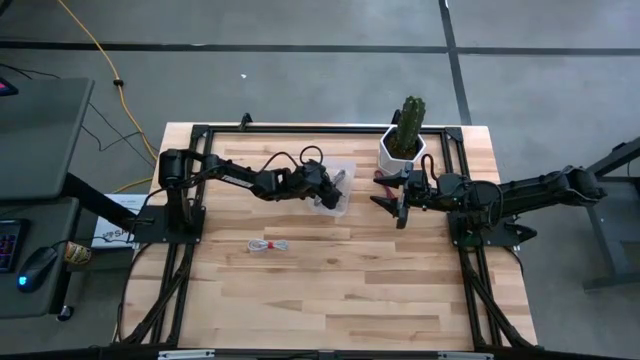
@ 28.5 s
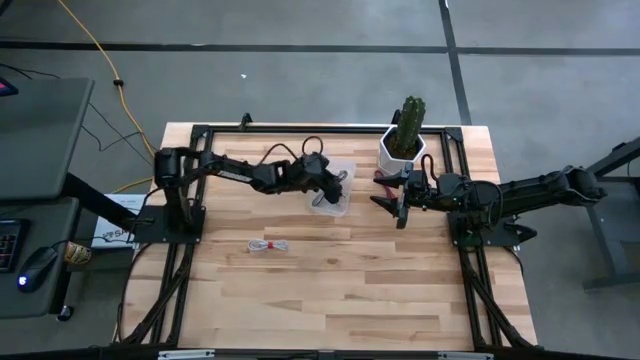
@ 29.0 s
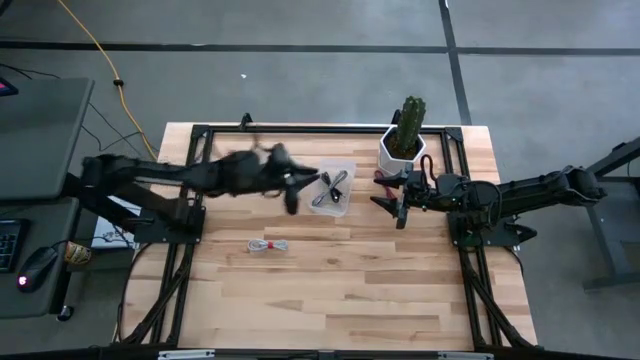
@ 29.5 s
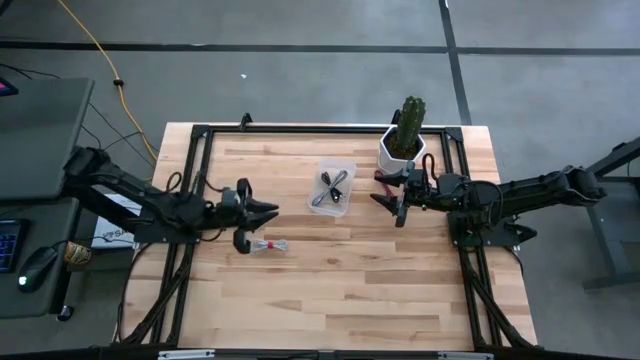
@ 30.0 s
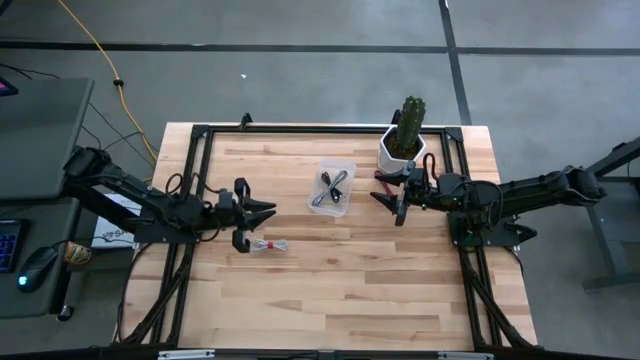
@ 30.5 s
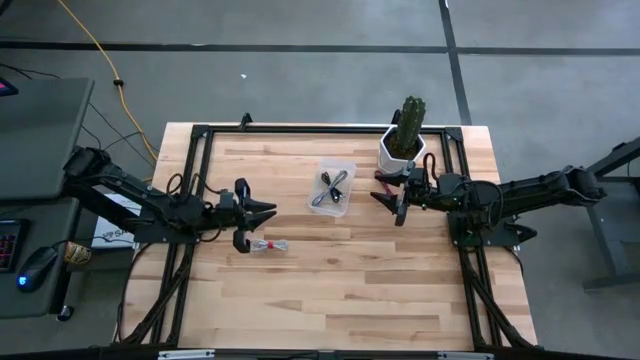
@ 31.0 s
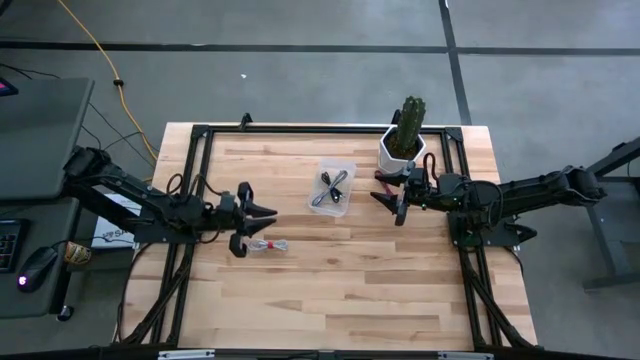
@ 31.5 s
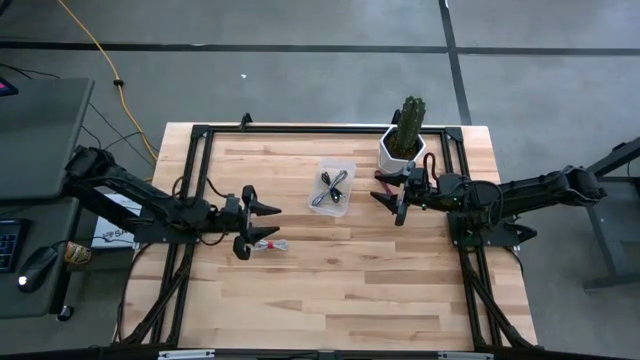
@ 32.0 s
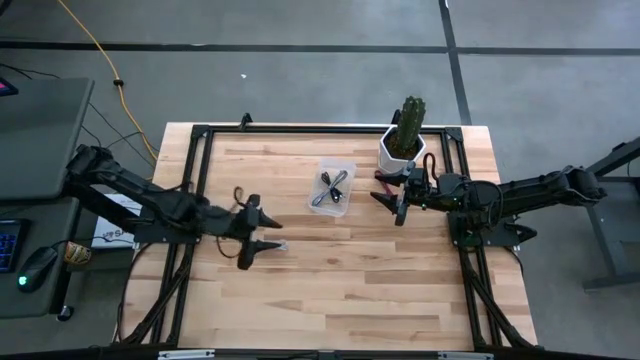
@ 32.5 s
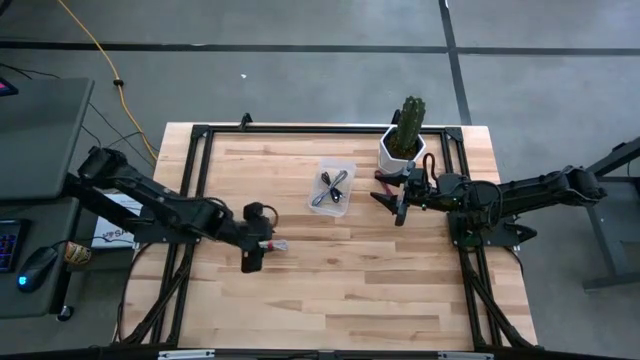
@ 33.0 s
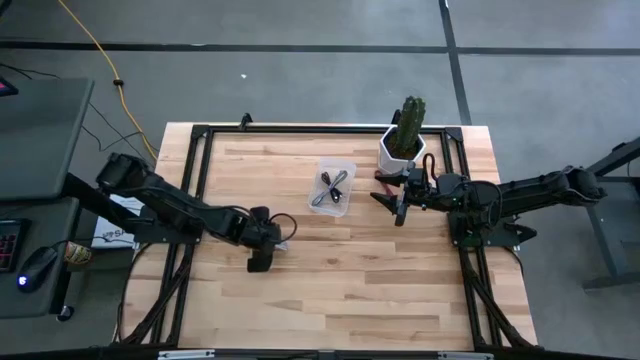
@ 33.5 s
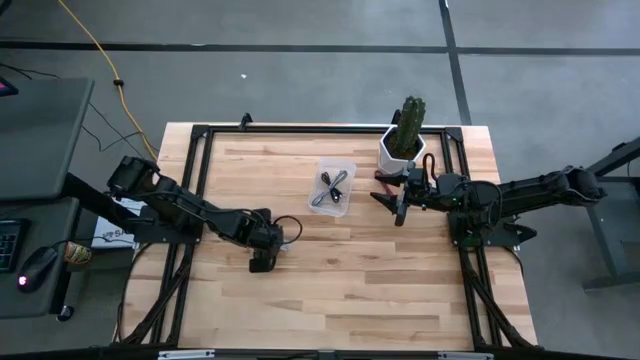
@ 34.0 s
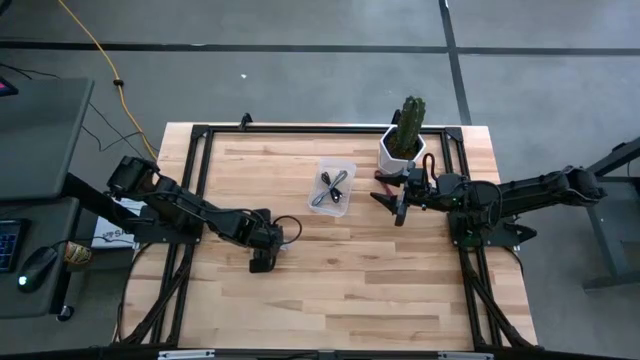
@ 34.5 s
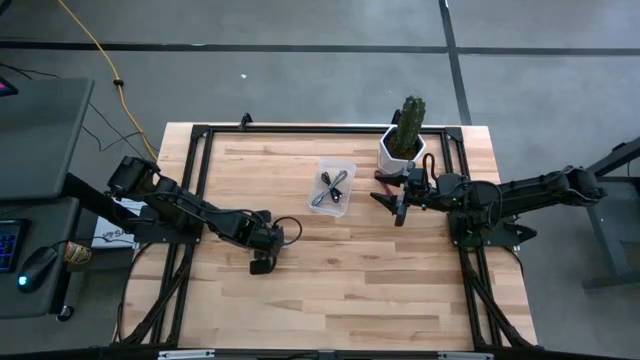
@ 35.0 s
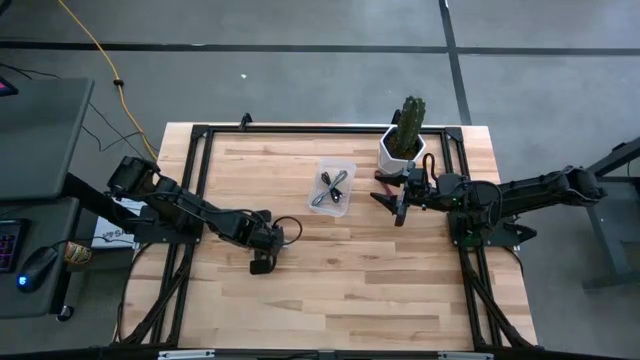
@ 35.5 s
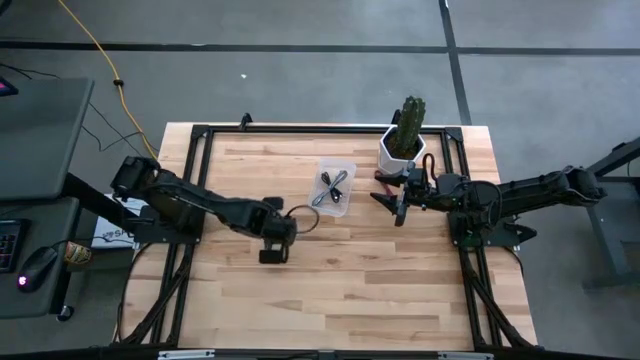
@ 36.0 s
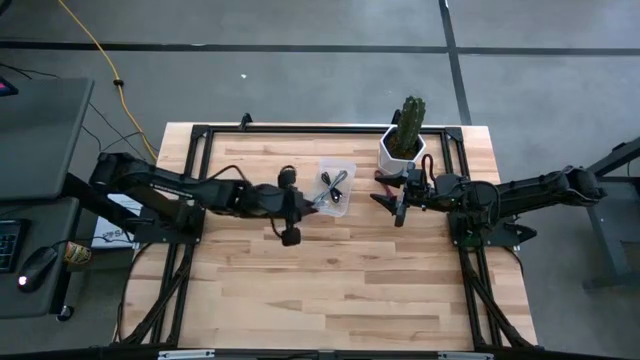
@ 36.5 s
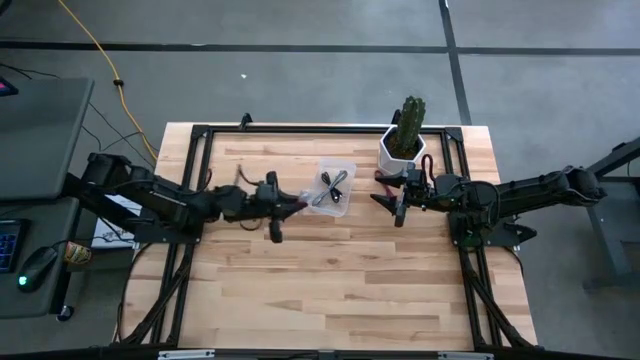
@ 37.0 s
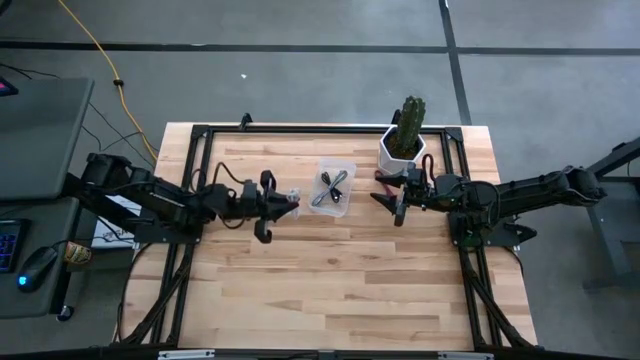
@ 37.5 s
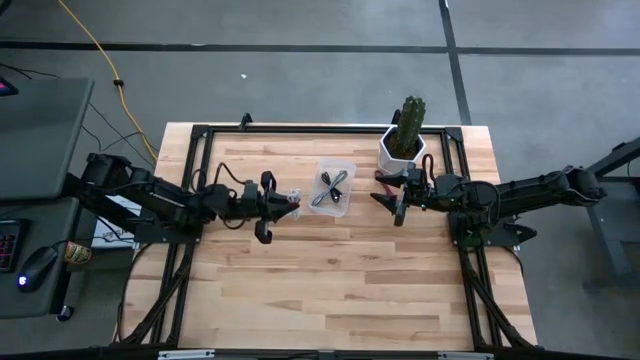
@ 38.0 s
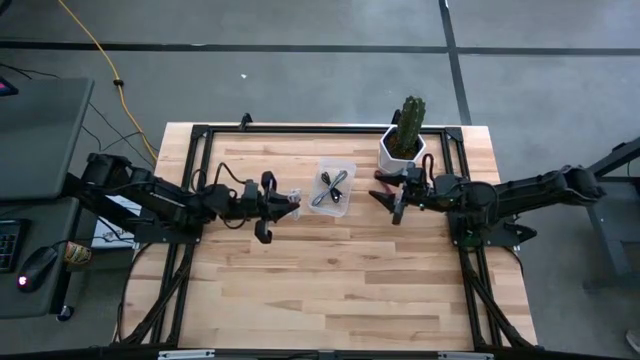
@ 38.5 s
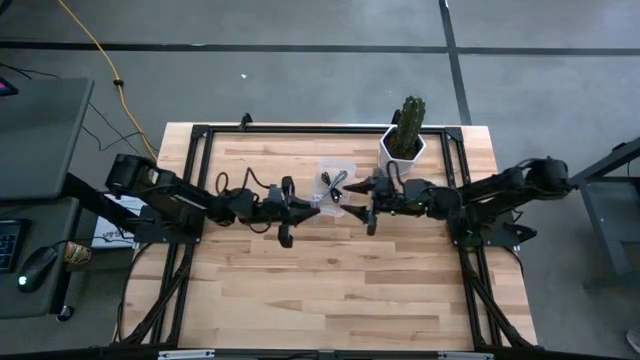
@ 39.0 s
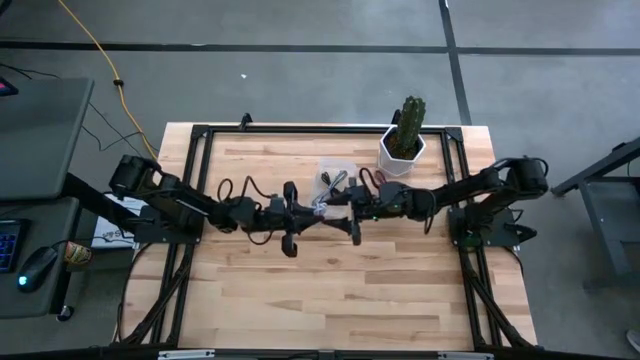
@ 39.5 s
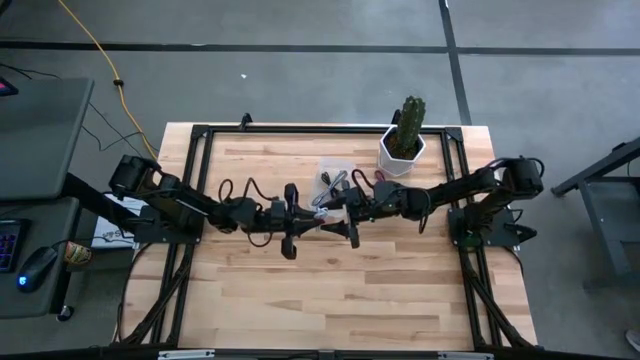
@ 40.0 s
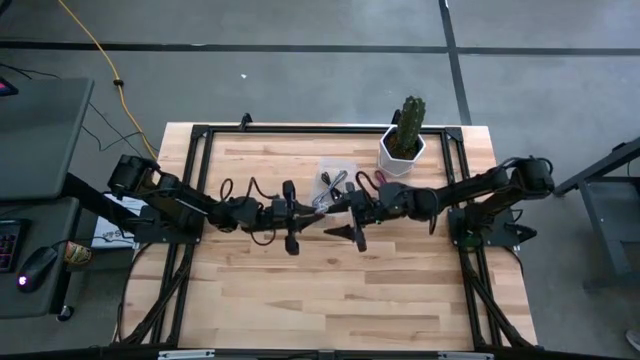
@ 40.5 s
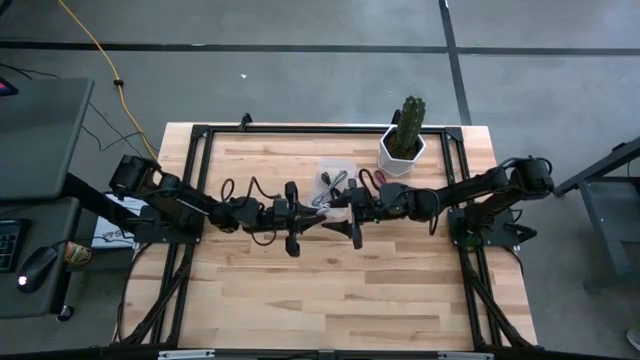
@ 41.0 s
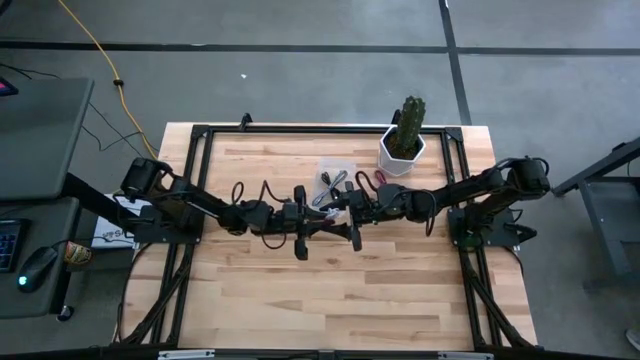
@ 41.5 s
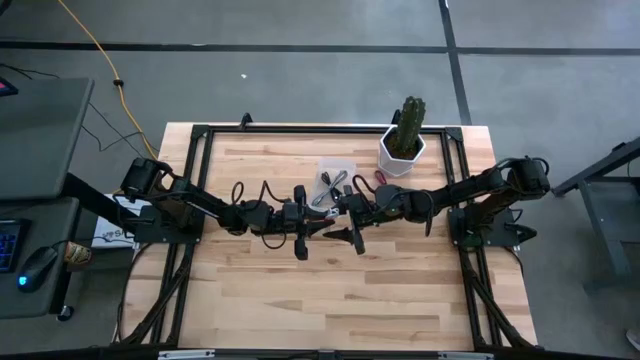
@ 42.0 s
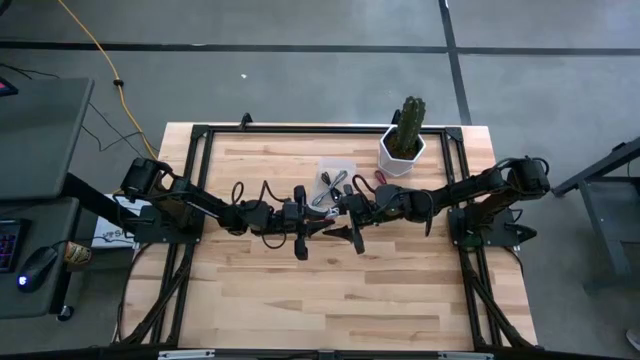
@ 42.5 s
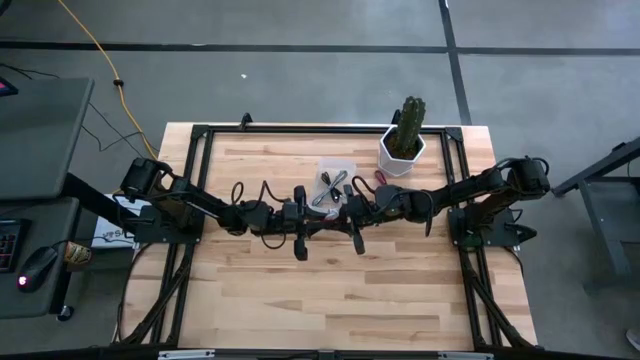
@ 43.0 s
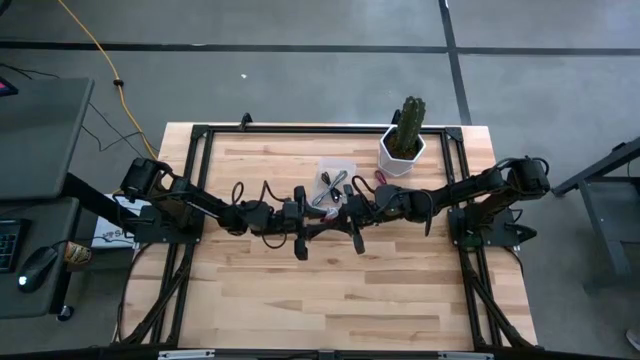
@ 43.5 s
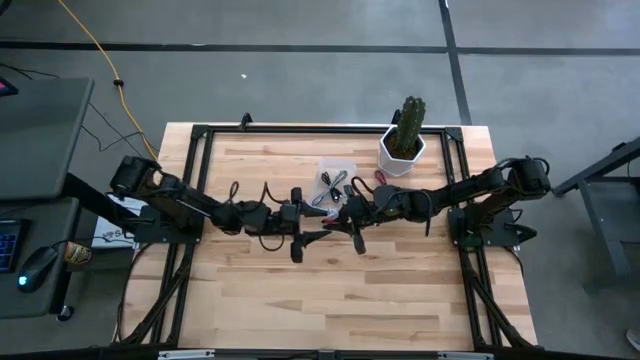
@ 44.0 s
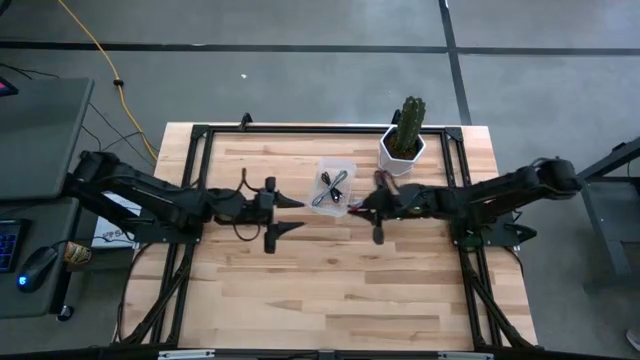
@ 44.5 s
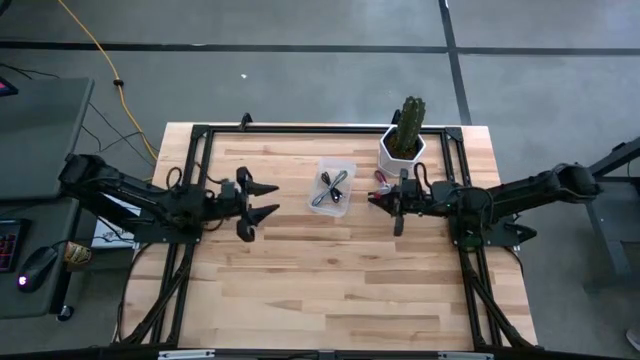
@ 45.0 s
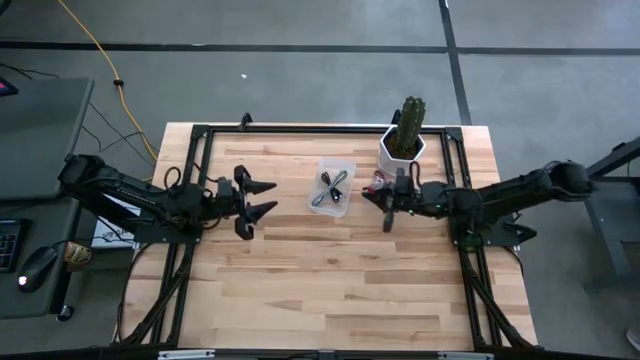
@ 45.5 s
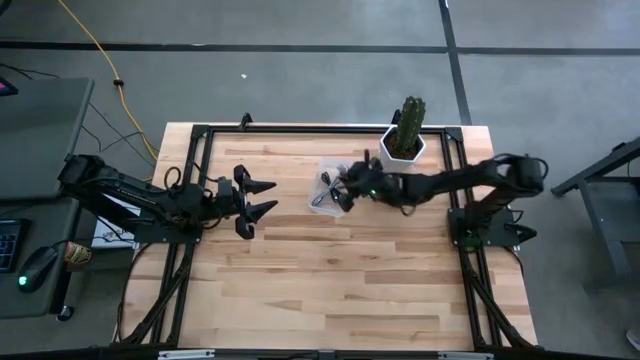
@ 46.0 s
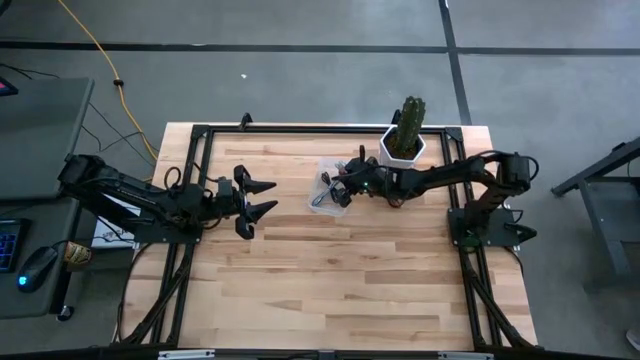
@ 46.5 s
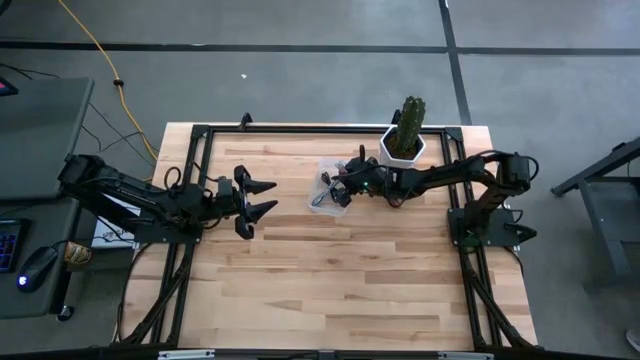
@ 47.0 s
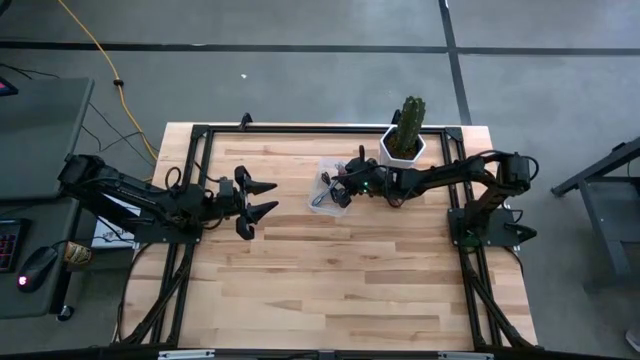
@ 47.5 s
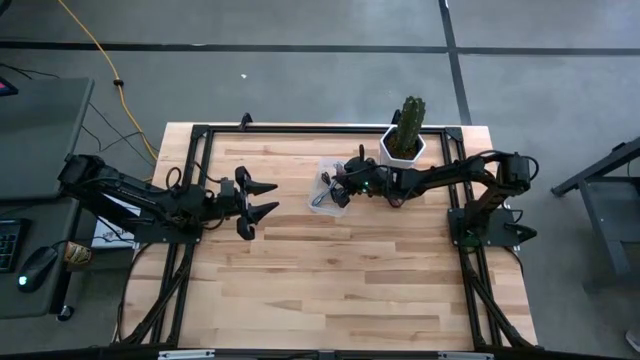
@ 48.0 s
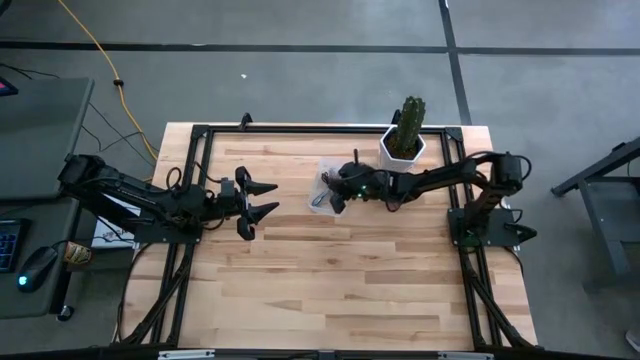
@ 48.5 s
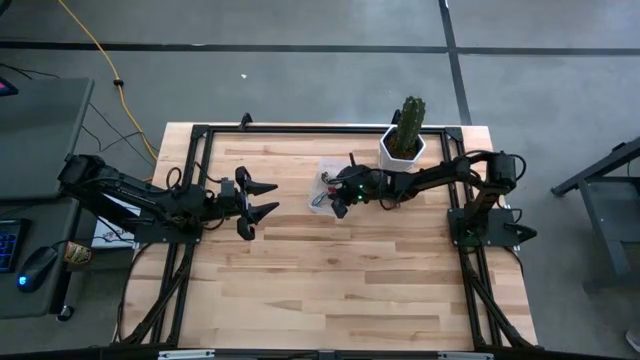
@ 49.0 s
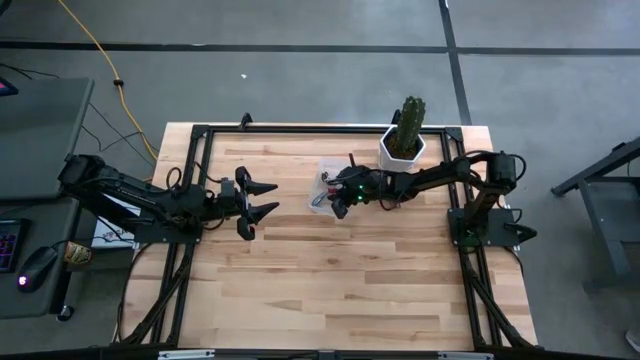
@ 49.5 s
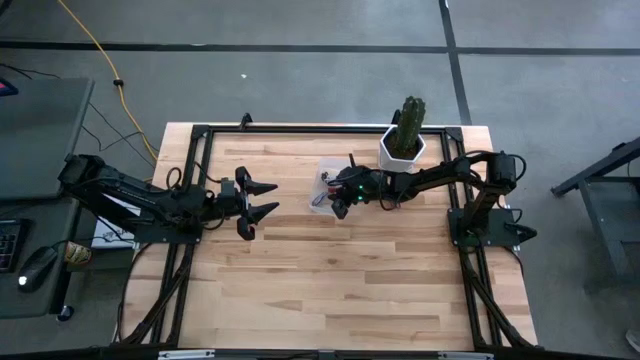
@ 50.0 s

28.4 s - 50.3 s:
Task: Pick and place USB-C Cables
Put the white charger cable into the transparent bin
